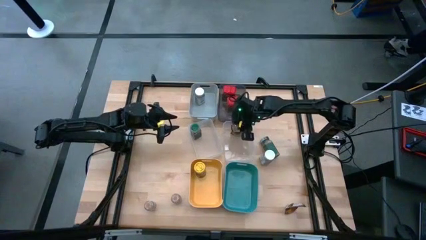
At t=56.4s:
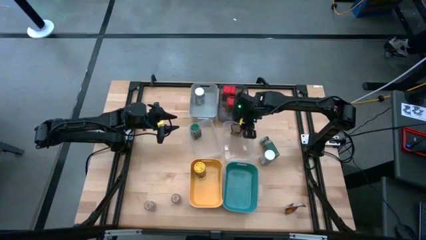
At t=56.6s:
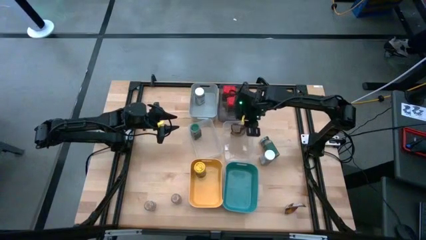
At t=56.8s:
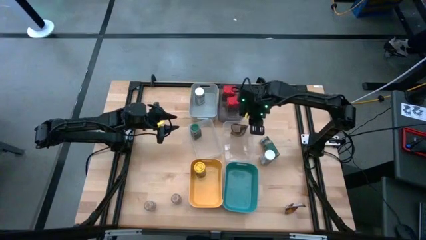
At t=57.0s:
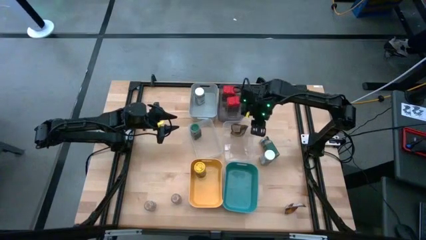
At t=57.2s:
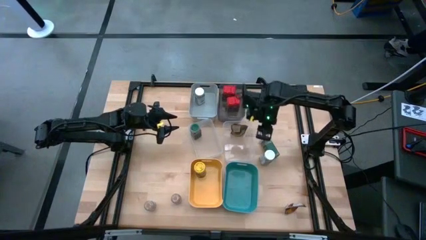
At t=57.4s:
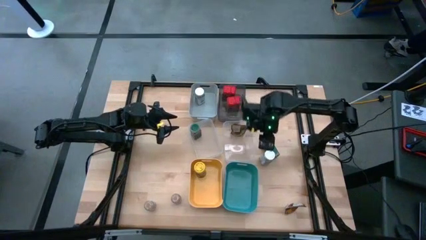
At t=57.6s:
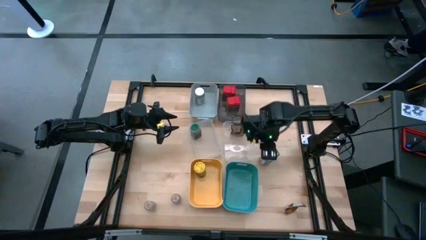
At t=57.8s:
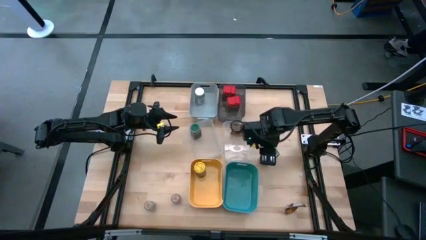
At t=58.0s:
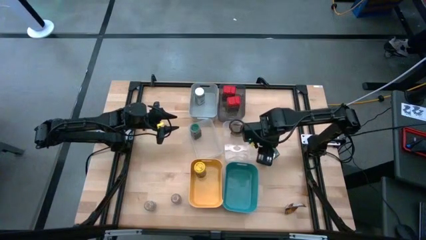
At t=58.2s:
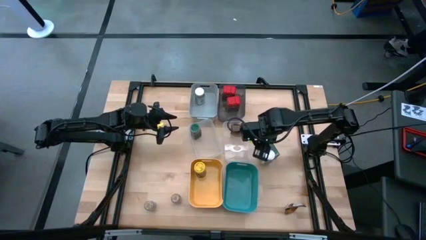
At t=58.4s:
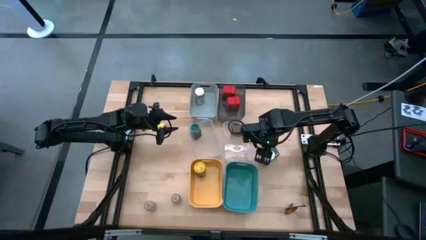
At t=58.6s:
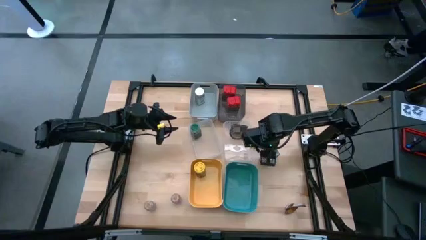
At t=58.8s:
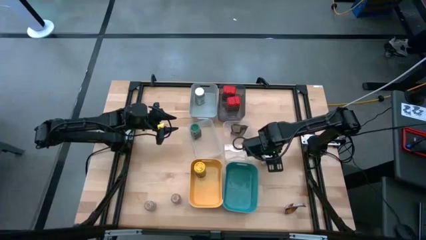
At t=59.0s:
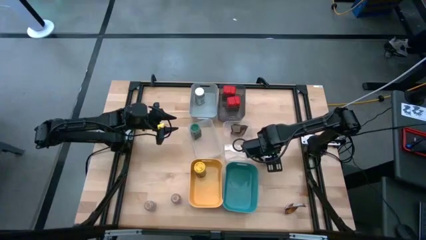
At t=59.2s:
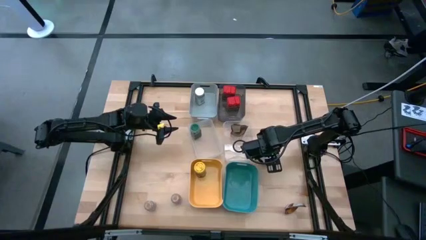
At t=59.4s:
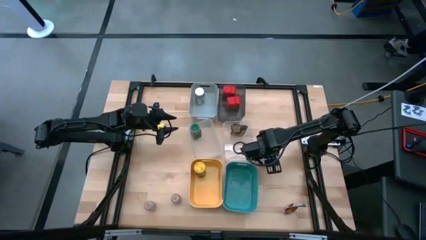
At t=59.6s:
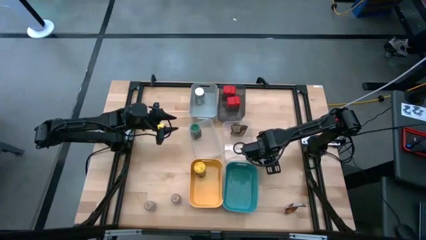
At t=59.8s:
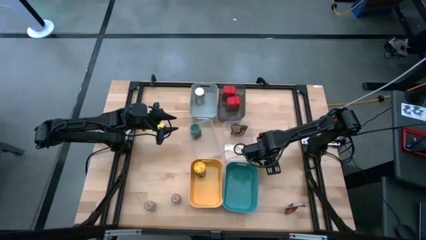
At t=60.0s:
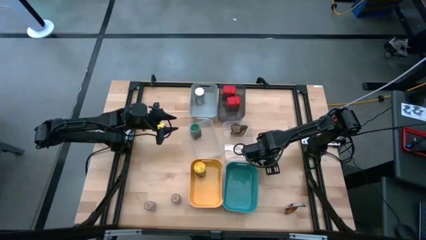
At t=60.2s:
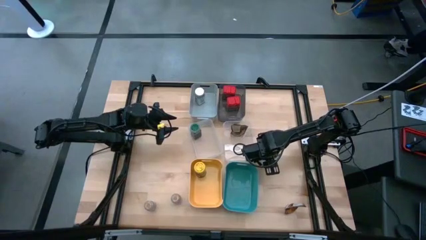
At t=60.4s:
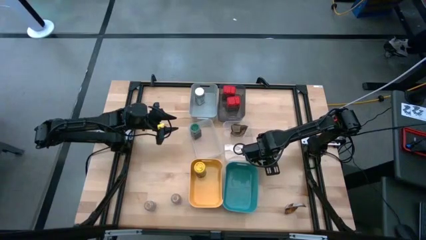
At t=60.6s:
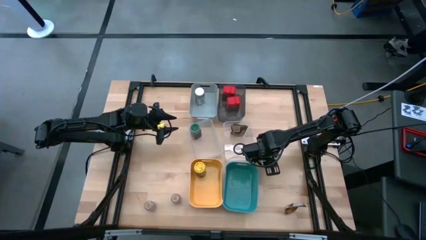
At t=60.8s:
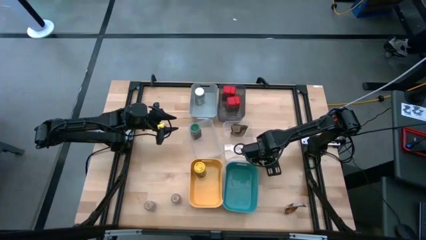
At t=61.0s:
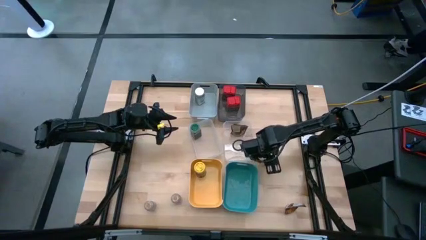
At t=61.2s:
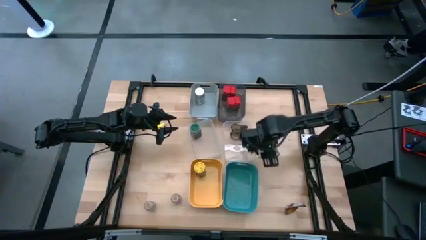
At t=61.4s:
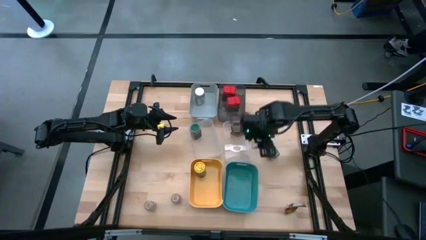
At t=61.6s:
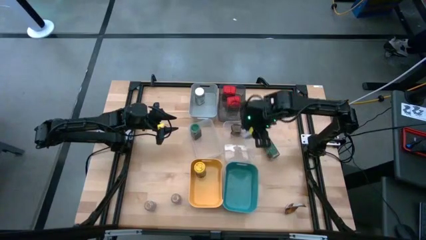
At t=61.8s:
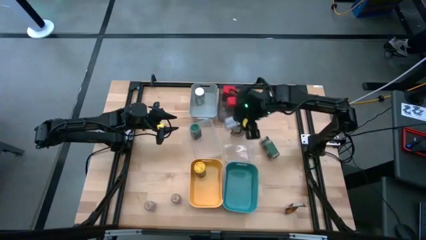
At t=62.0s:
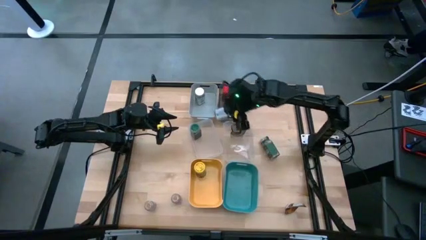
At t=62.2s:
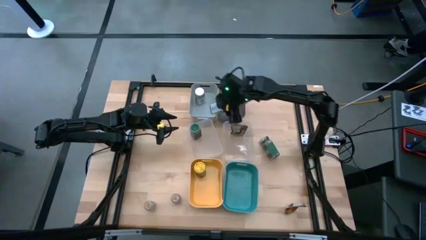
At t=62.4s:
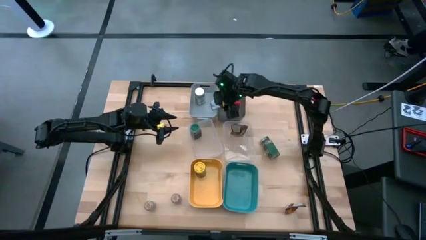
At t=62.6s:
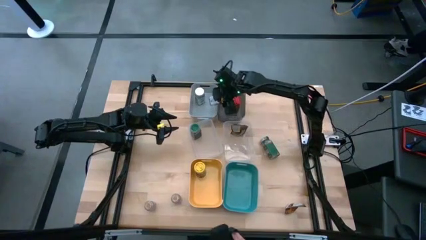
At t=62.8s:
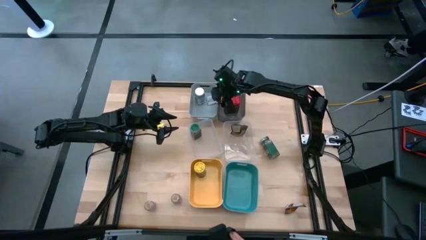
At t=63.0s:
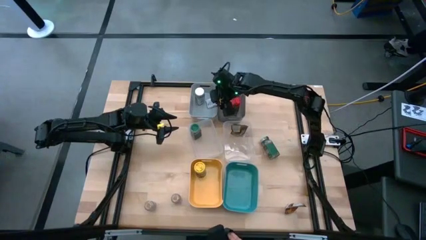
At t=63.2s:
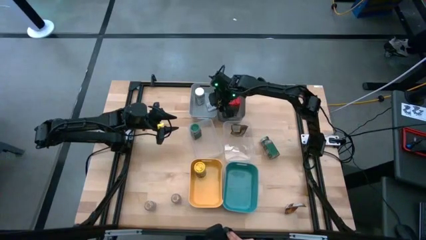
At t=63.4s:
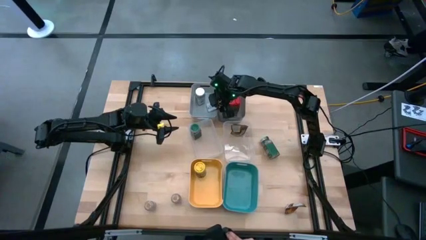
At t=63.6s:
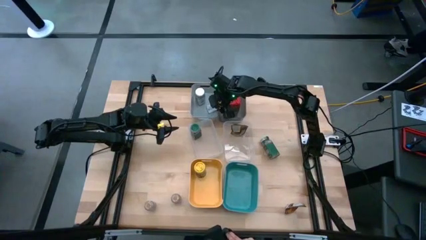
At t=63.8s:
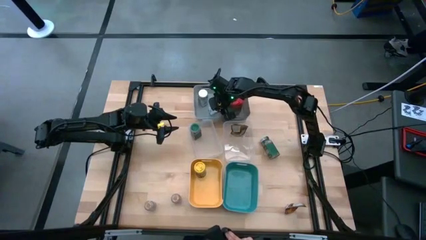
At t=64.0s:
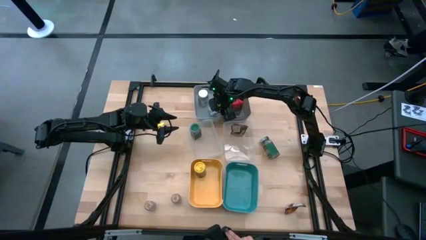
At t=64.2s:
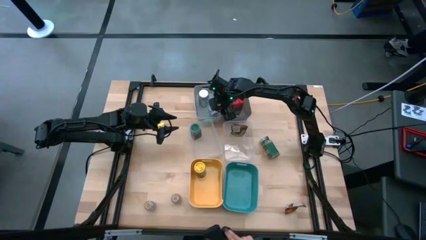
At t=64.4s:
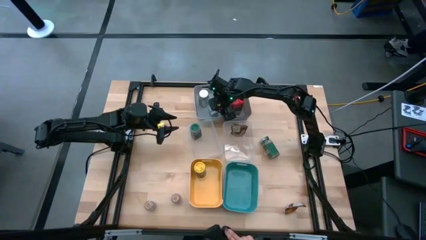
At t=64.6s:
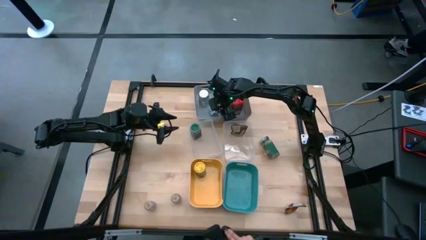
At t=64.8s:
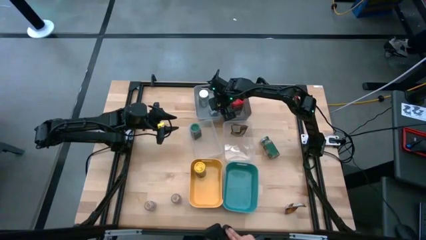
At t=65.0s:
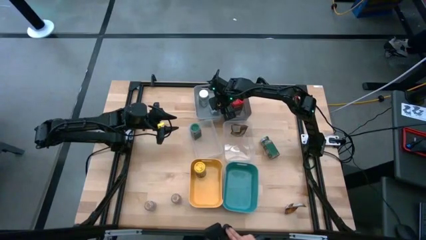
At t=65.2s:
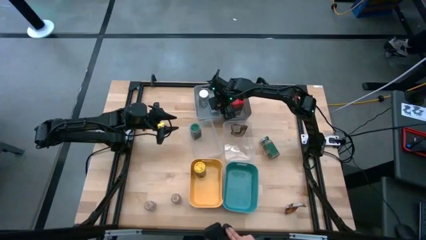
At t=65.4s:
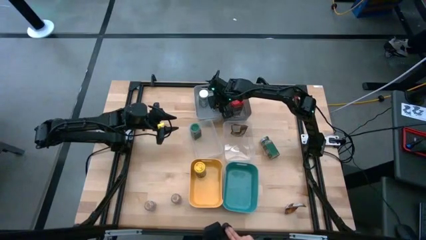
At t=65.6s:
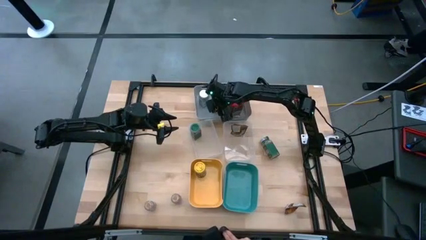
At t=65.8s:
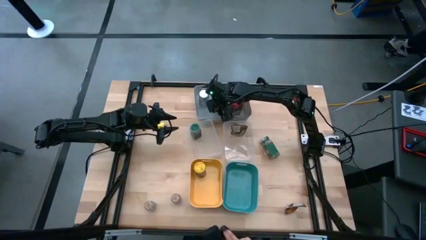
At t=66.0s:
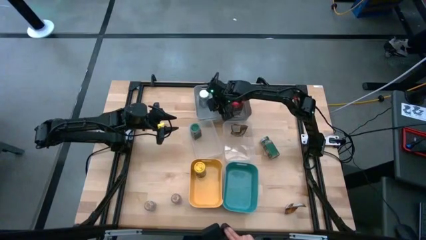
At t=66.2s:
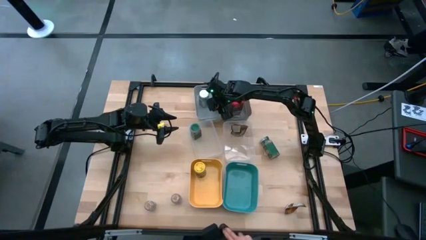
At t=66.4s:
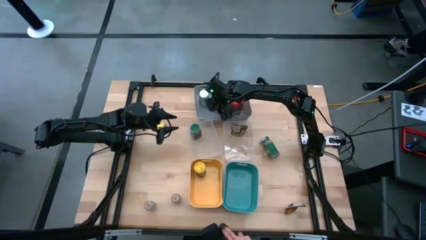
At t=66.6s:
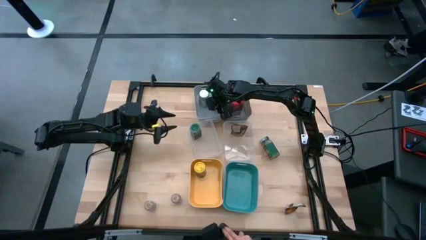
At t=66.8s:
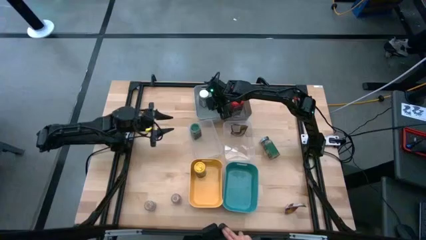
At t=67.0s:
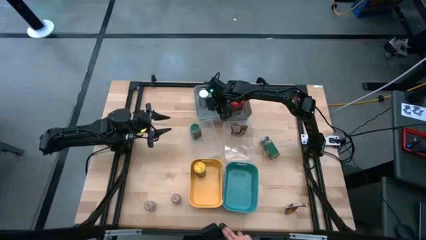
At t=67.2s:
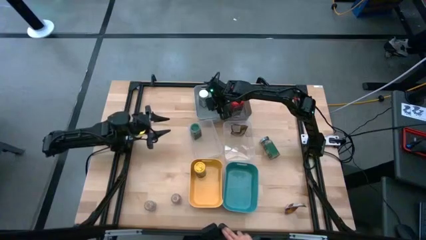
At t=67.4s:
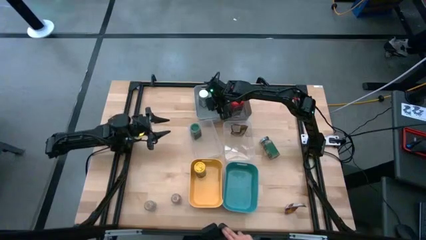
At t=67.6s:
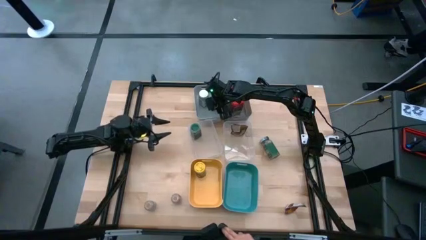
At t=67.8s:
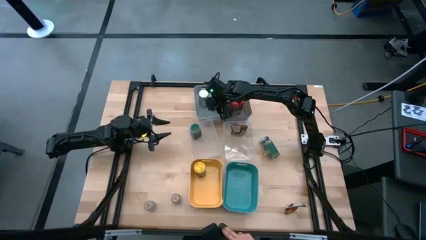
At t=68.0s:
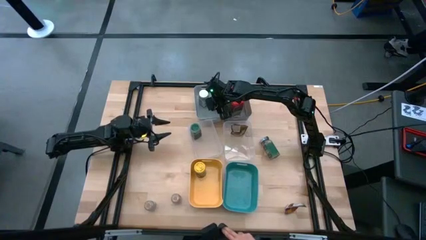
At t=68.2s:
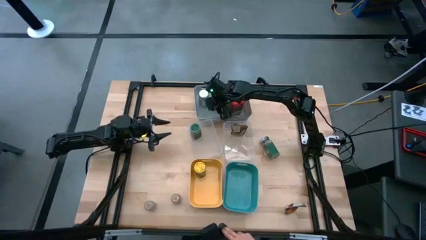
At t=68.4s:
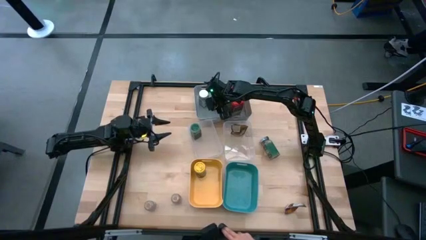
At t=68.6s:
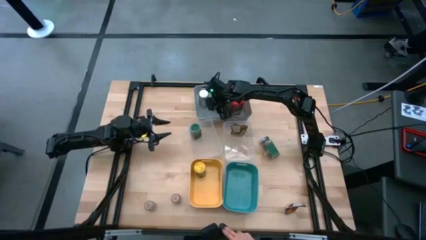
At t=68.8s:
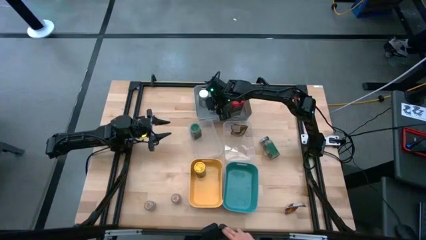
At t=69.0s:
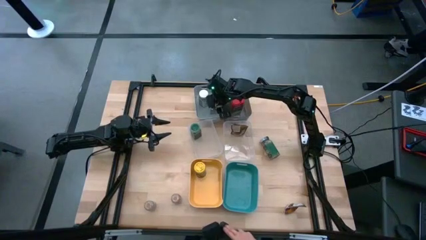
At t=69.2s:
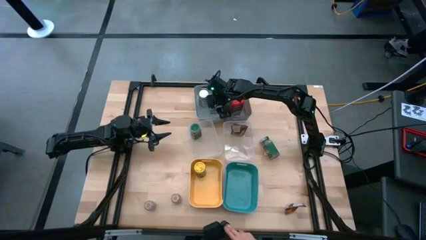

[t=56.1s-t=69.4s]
Task: Sort spices by type
Put the white seasoning bottle into the gray bin
